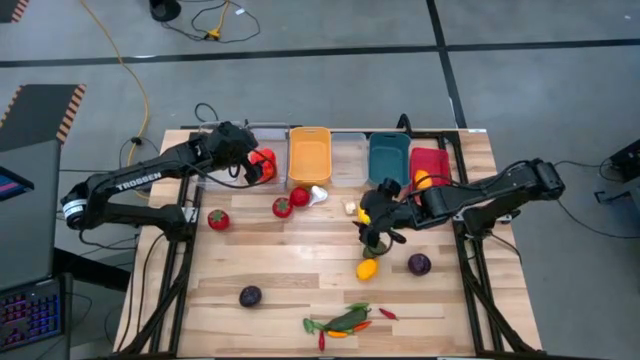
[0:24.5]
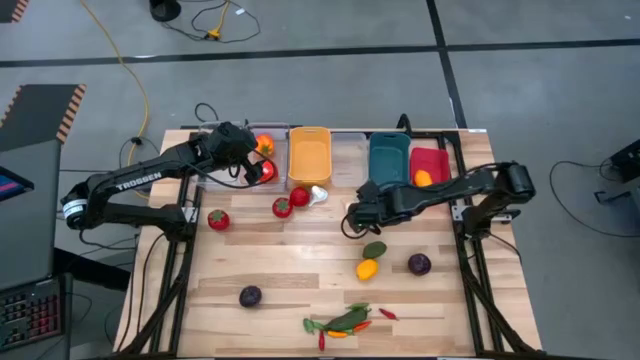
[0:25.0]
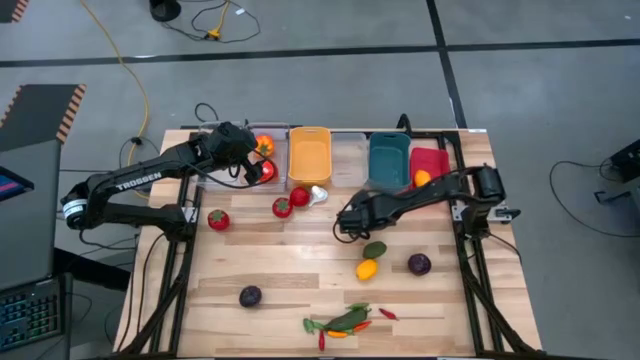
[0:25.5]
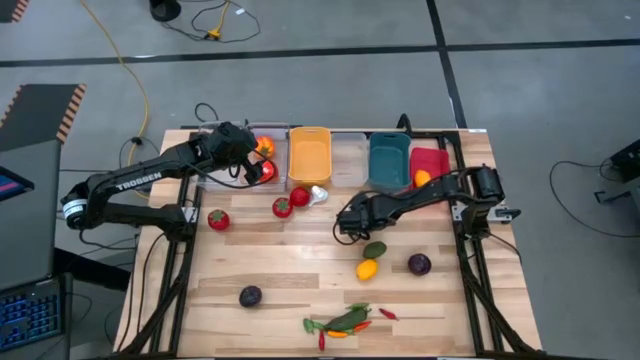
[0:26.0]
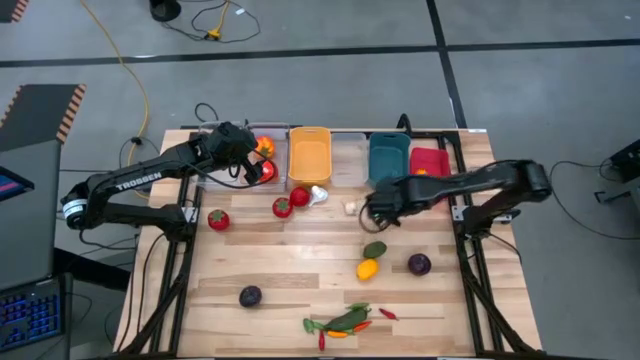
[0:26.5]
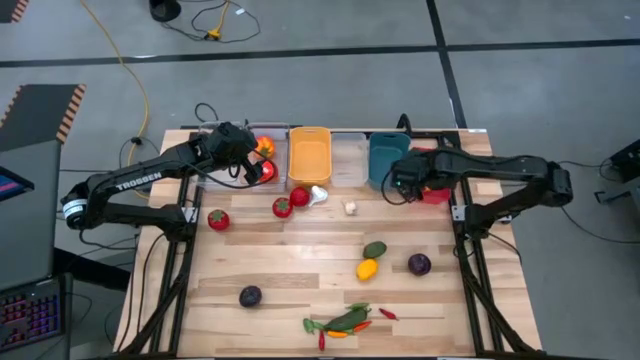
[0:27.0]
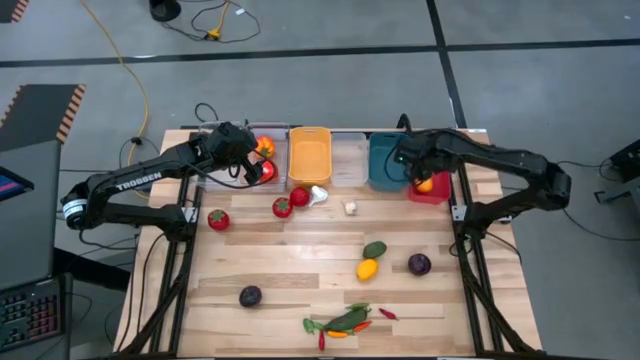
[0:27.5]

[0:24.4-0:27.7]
Task: Sort produce into baskets
Put the lemon into the red bin

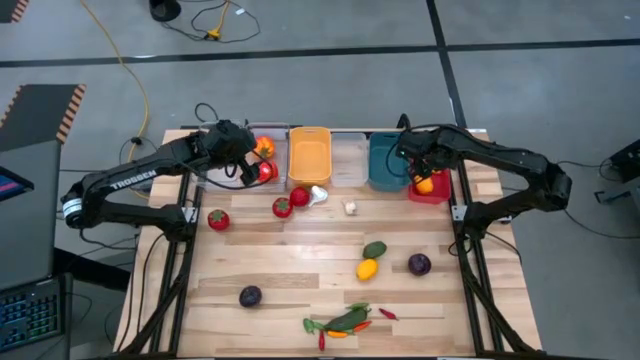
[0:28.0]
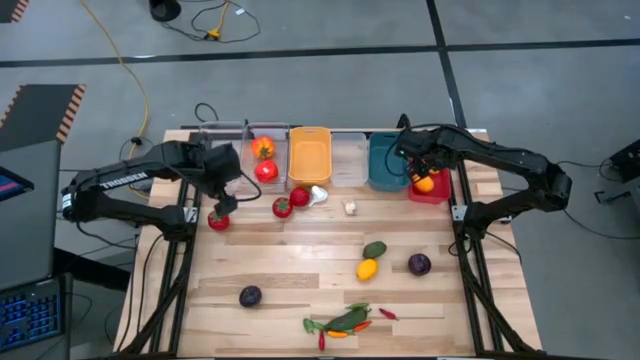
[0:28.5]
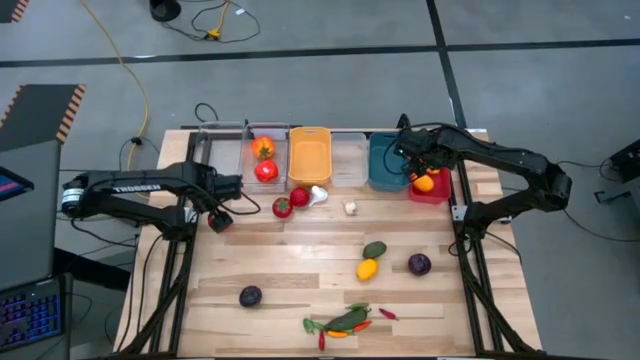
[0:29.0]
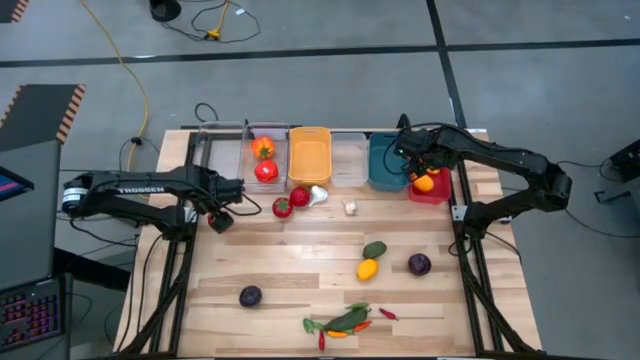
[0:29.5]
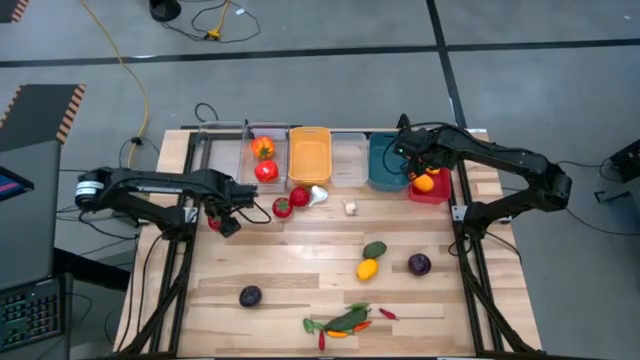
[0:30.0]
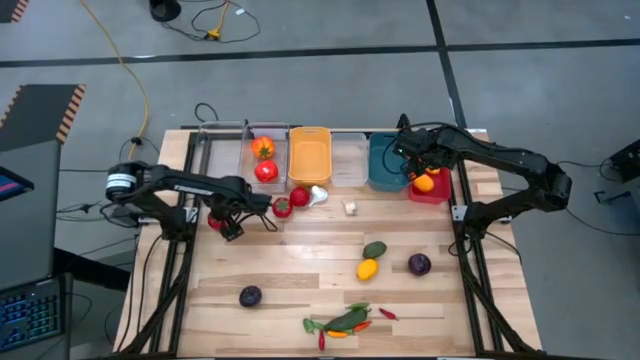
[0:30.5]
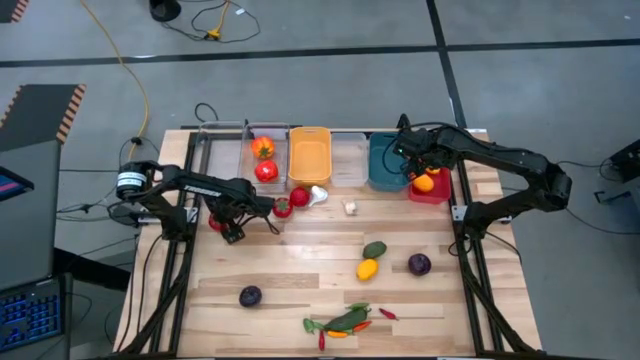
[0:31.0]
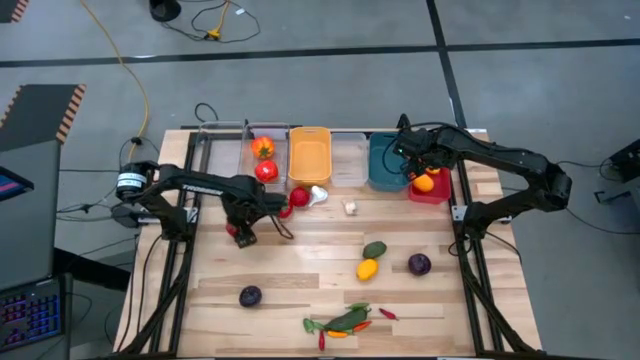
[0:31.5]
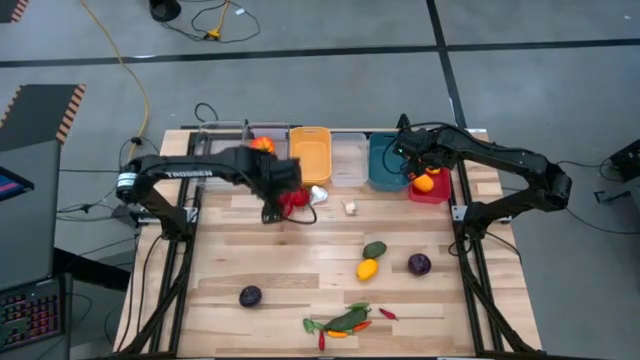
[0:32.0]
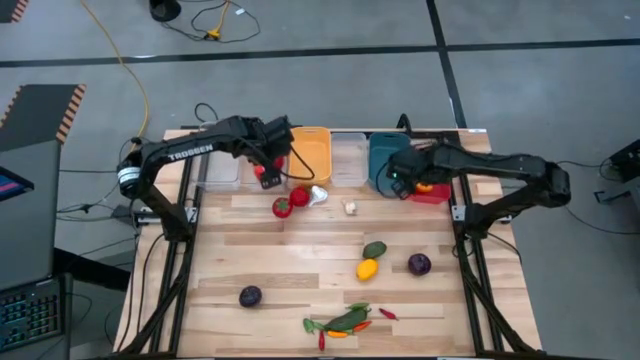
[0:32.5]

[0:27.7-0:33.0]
Put the tomato into the right transparent bin

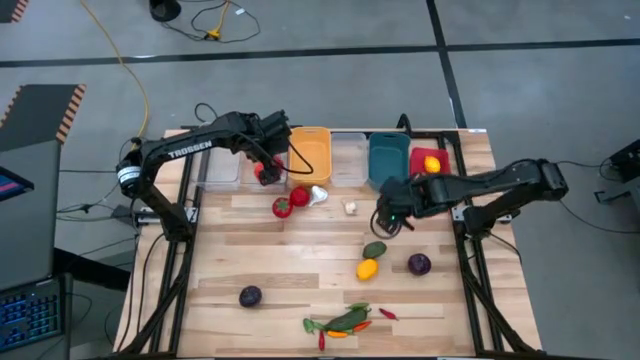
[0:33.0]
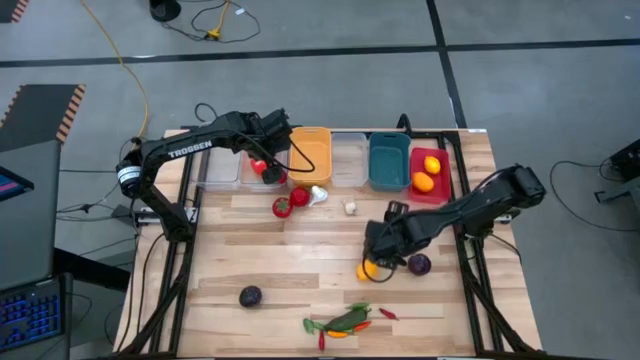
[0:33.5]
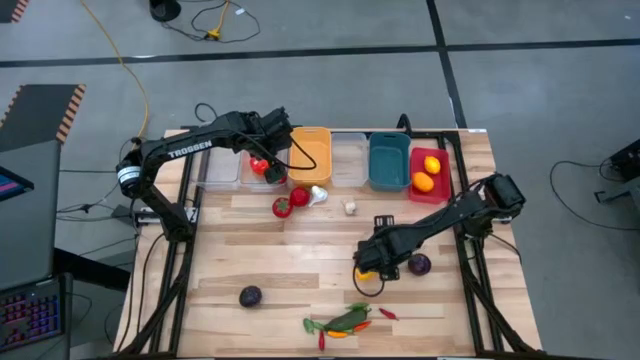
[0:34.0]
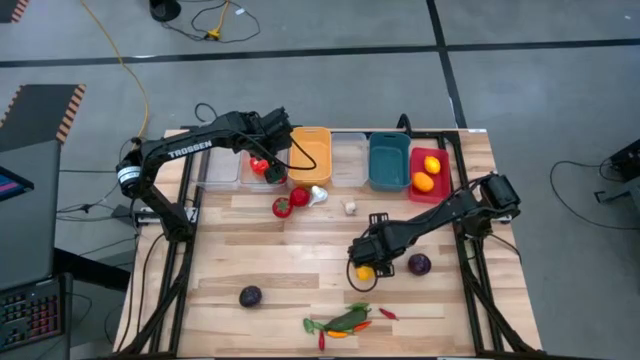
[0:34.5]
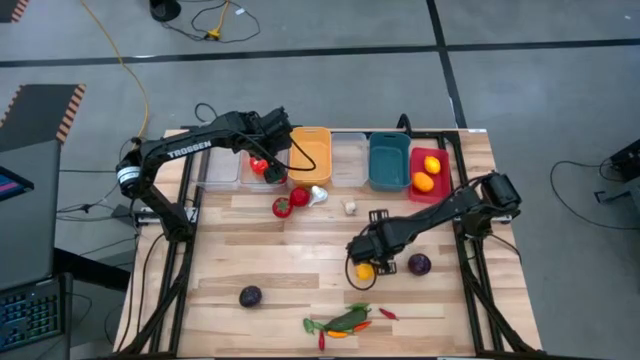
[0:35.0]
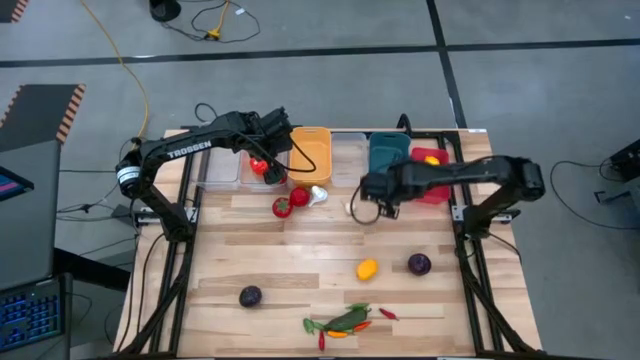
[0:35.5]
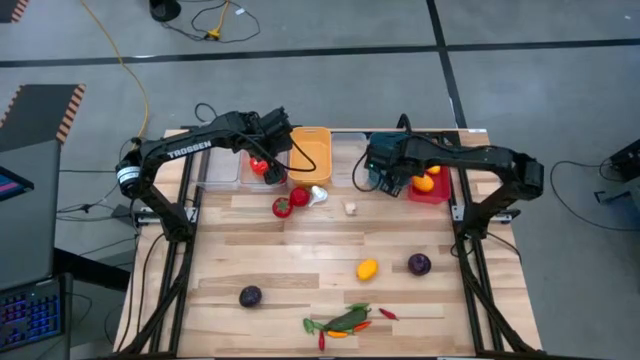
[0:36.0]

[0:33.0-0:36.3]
Put the lime into the blue bin

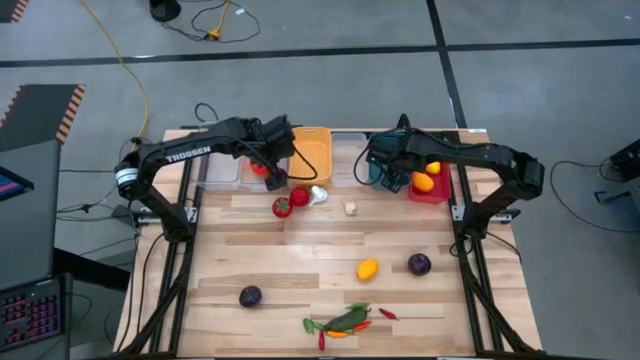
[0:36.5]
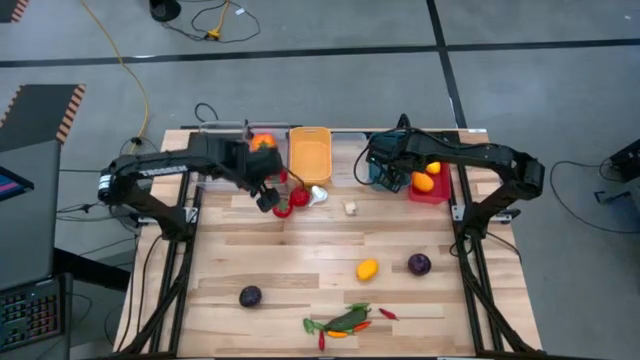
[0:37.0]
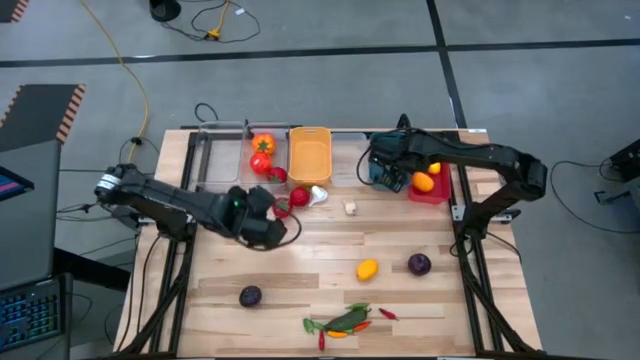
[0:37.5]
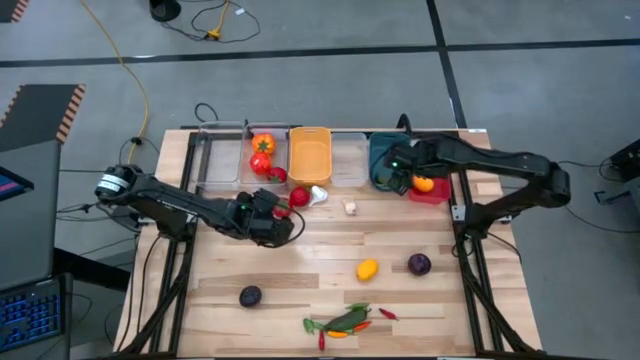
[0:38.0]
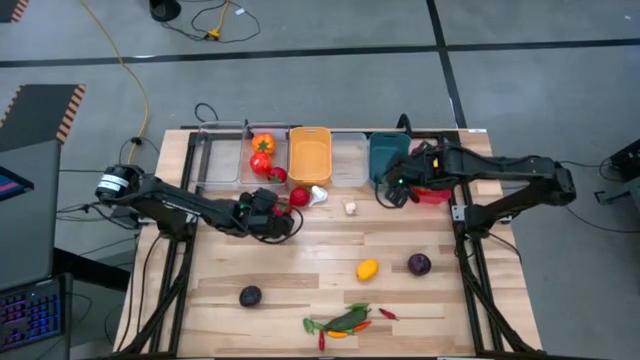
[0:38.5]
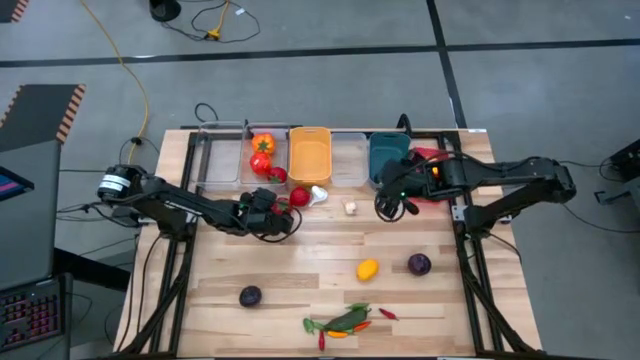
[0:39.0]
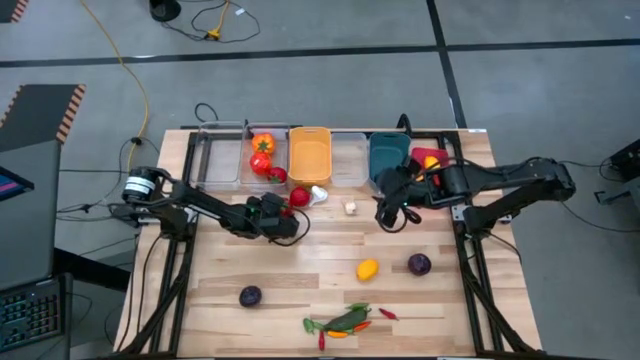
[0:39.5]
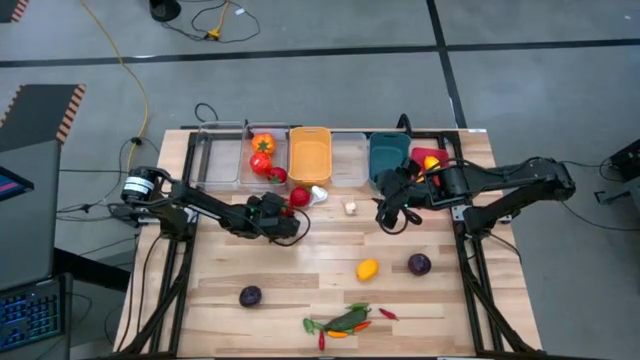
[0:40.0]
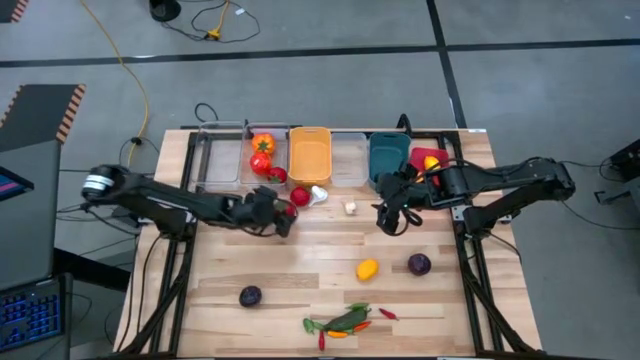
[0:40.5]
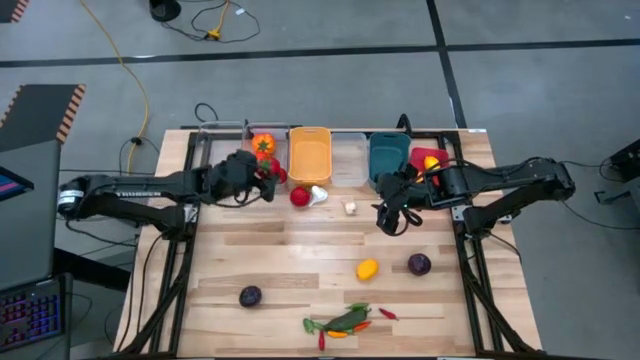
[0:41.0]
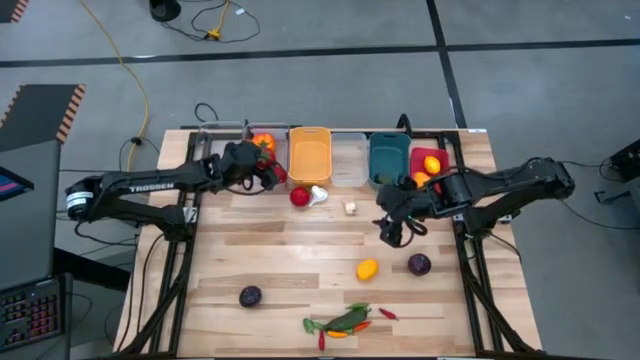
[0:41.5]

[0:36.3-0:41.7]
Put the tomato into the right transparent bin

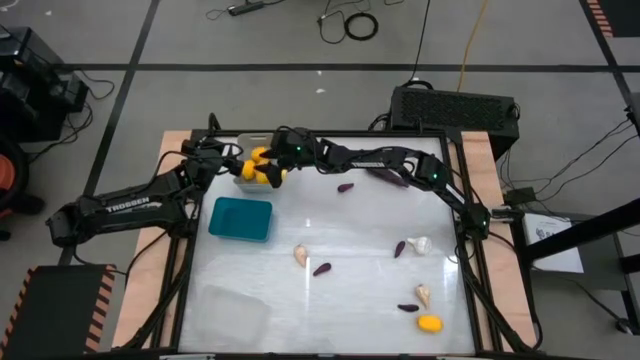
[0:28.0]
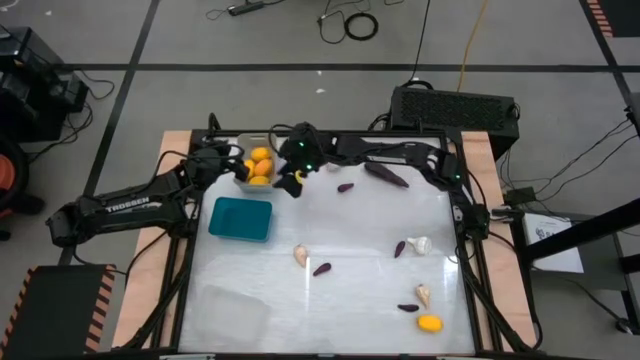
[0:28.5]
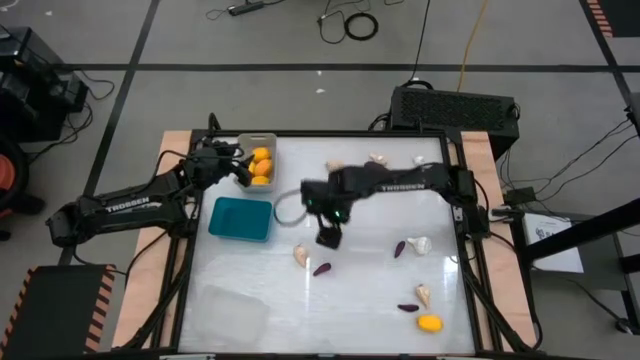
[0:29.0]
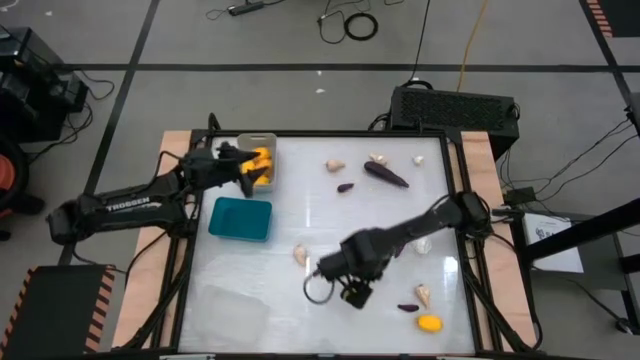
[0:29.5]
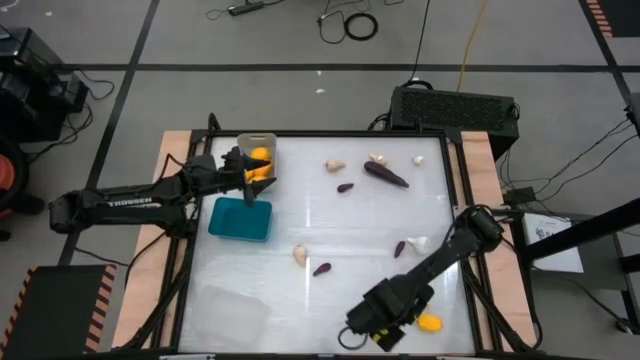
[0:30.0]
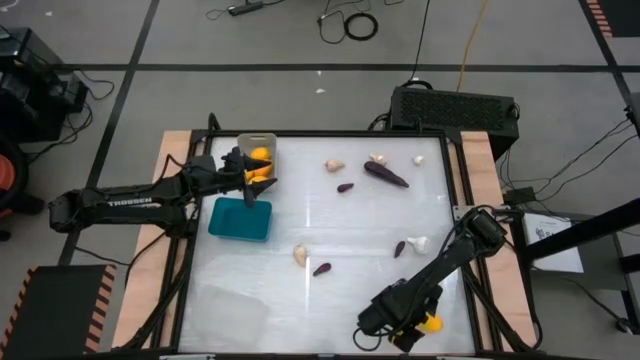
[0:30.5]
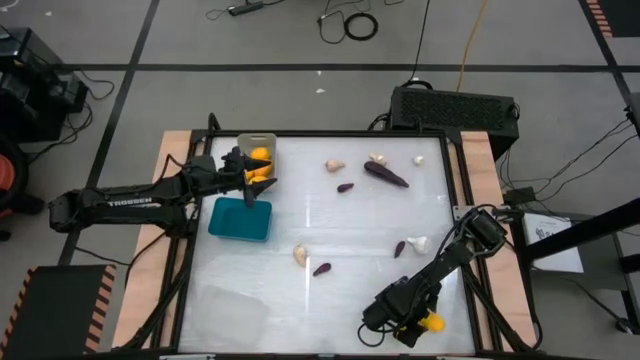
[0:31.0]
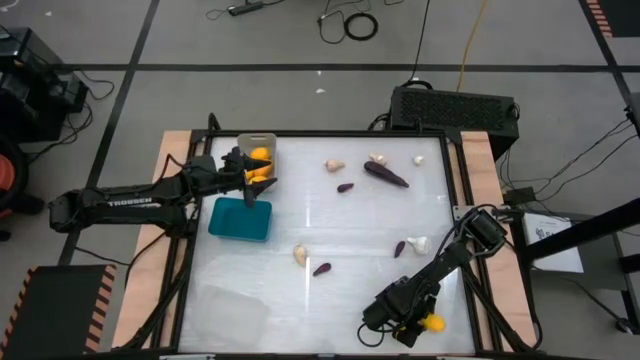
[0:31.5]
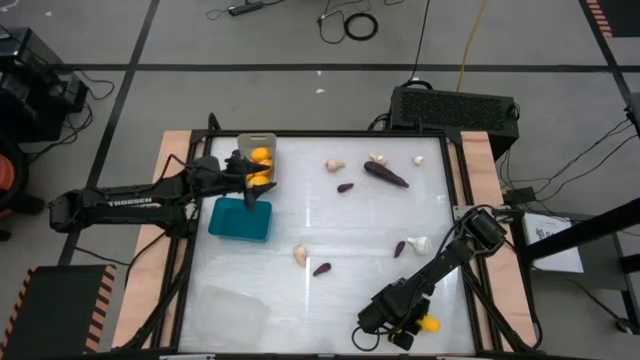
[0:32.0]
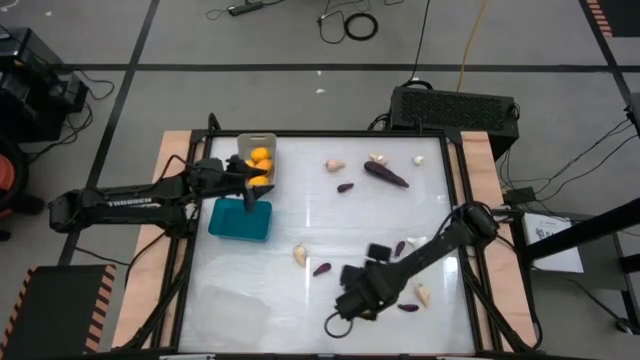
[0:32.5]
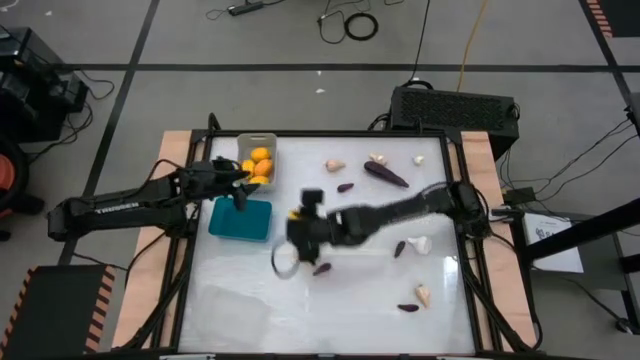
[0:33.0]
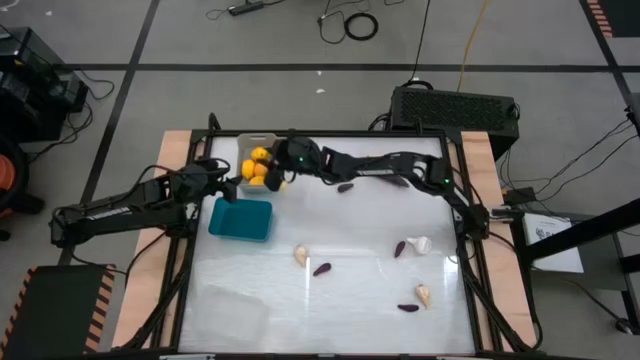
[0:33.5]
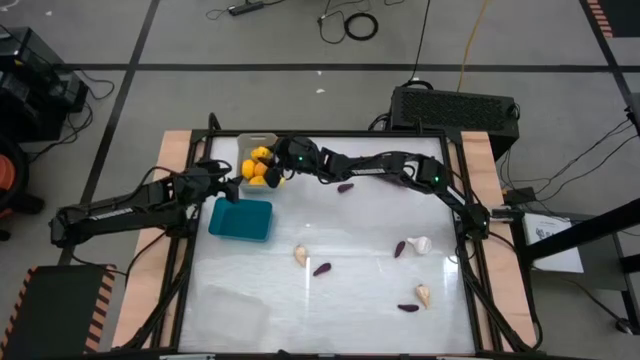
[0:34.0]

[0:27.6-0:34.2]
Task: Sort produce into baskets
Put the yellow lemon into the gray bin
